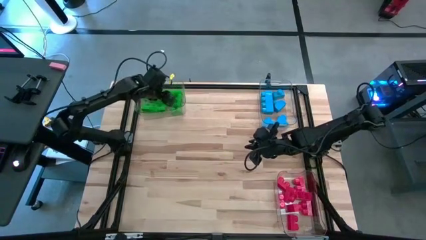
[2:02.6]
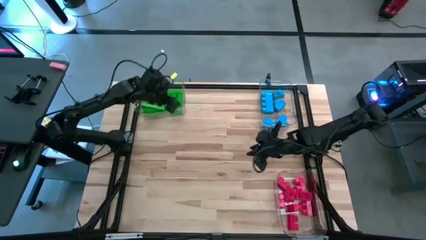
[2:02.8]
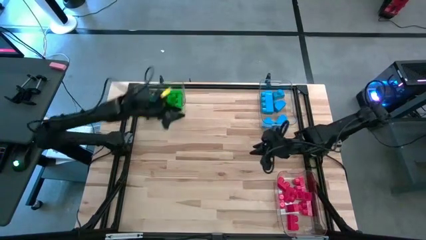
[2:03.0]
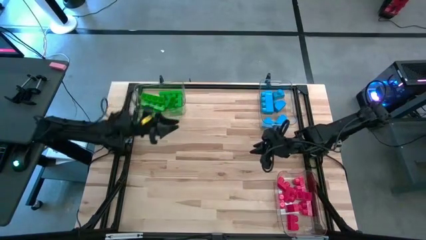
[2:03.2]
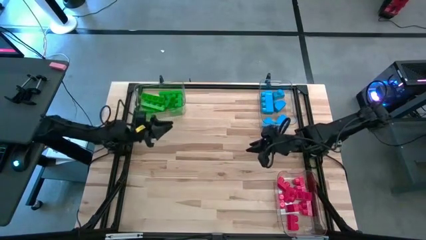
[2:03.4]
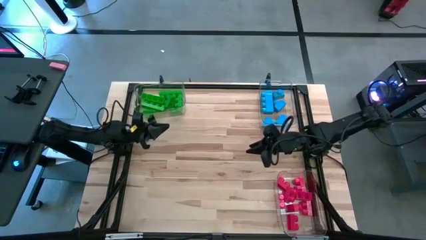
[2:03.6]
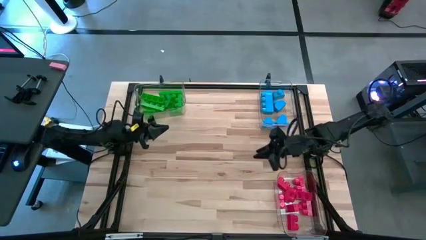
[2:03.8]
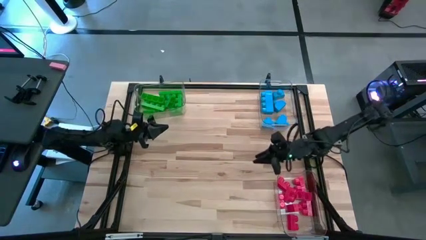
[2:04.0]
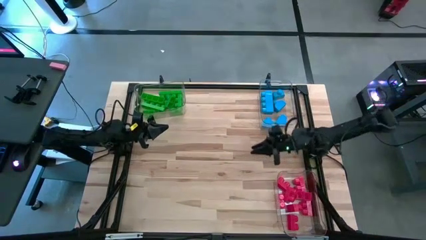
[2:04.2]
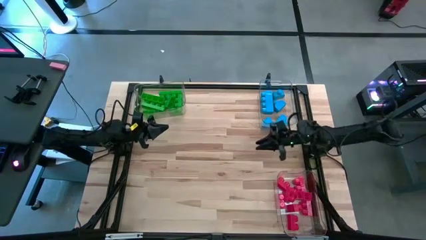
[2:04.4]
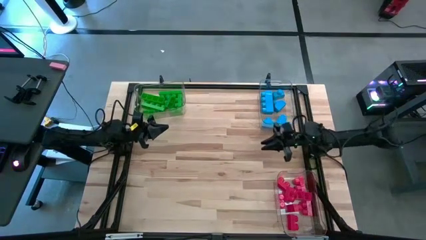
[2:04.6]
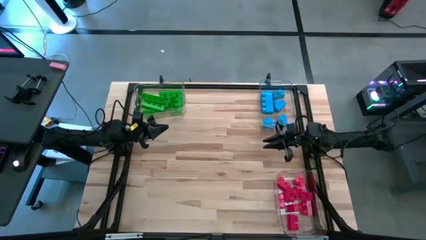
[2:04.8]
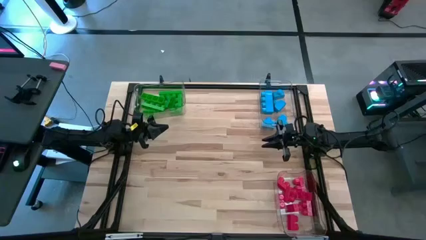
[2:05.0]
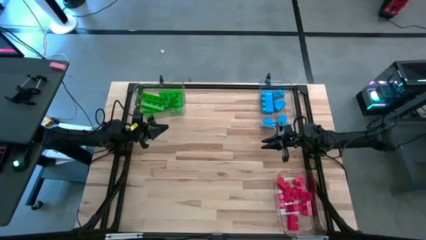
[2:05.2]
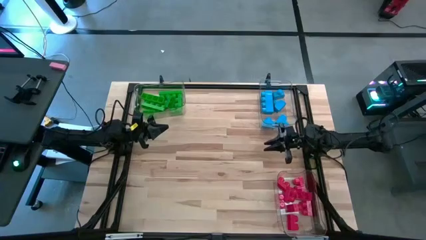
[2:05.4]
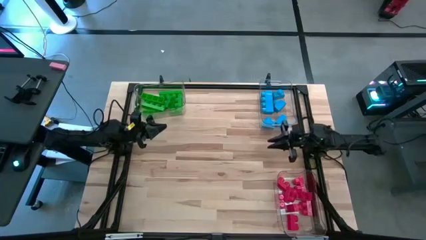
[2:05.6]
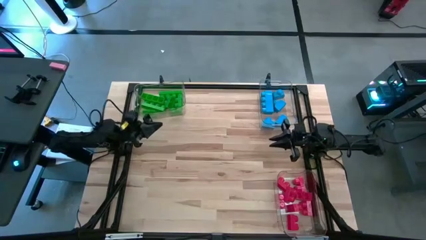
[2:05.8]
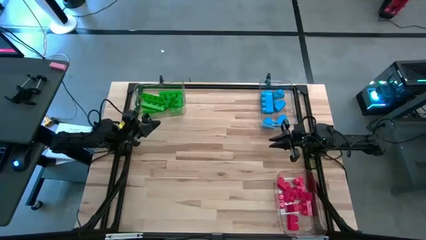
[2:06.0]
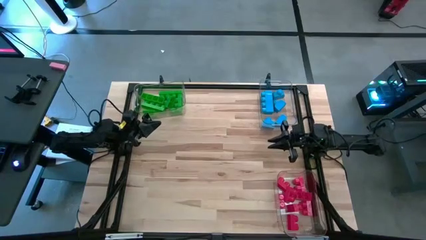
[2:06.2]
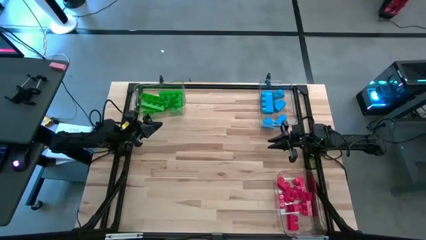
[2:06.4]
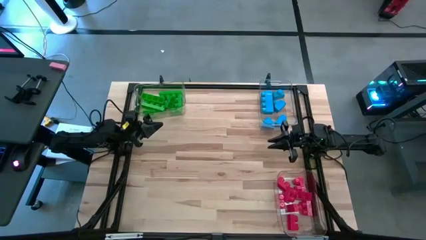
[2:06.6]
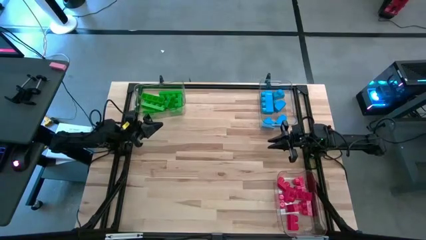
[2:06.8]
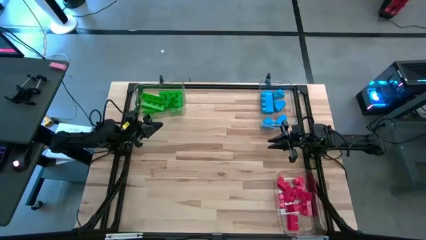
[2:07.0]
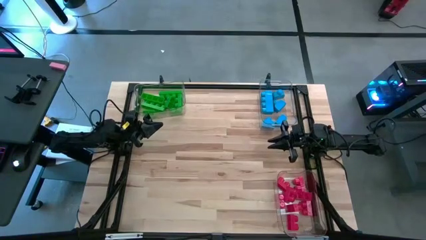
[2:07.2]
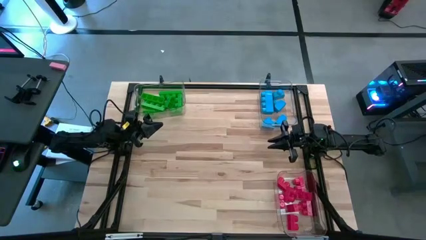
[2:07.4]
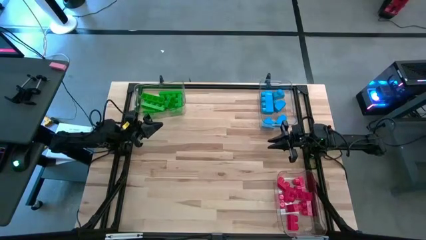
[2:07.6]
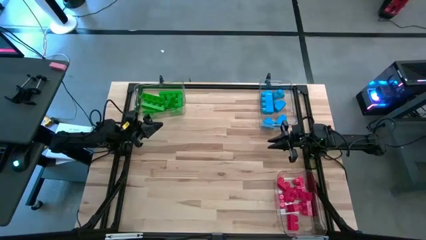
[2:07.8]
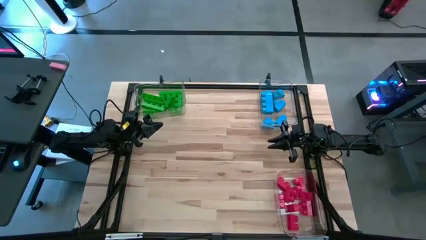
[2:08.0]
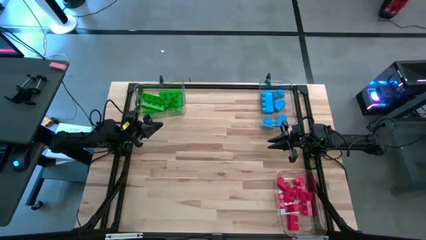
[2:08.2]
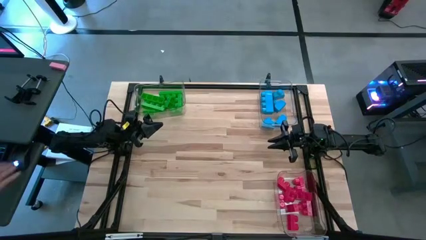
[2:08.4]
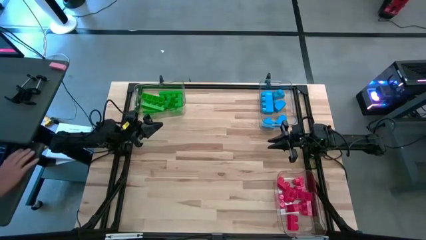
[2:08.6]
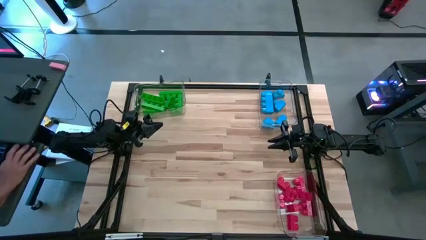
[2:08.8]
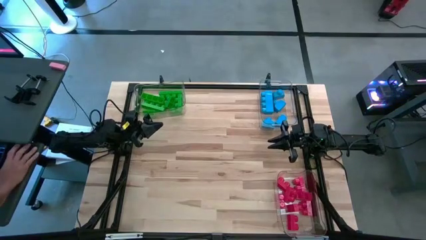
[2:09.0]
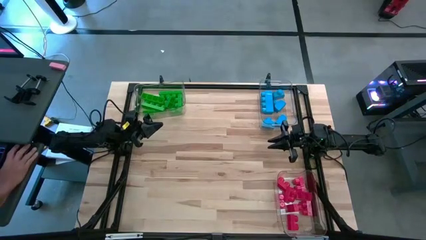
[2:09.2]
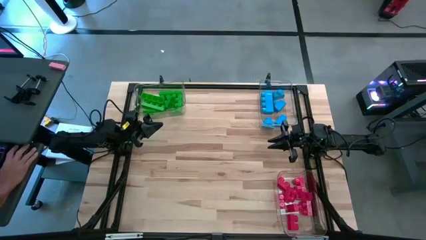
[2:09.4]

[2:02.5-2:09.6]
Task: Sort blocks
Return to Home Position

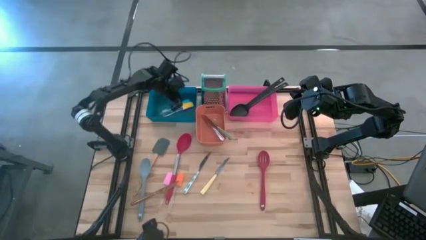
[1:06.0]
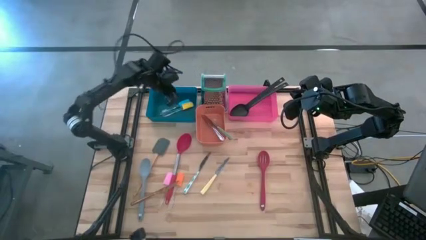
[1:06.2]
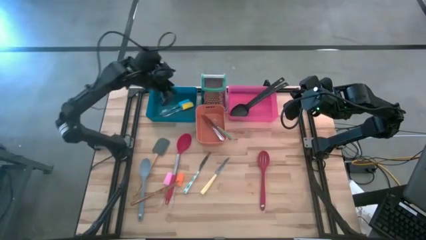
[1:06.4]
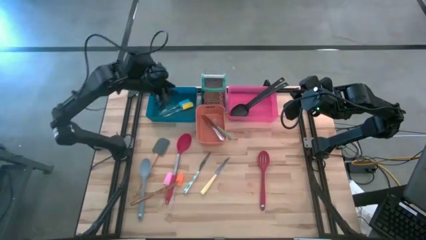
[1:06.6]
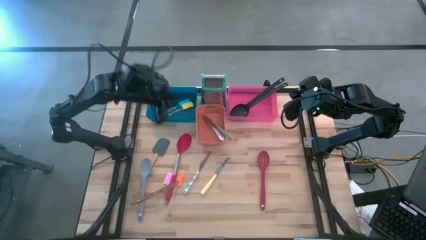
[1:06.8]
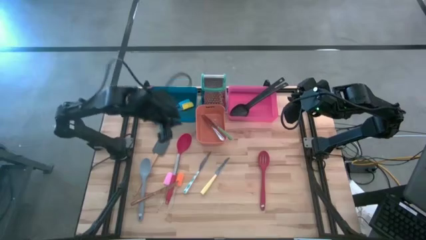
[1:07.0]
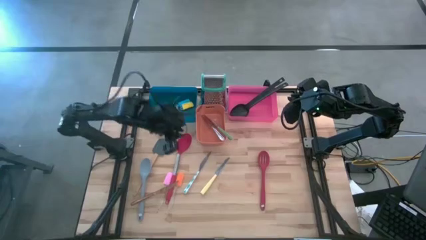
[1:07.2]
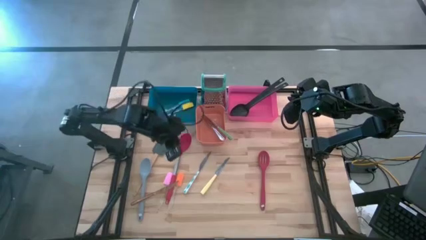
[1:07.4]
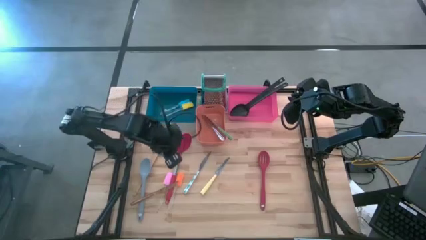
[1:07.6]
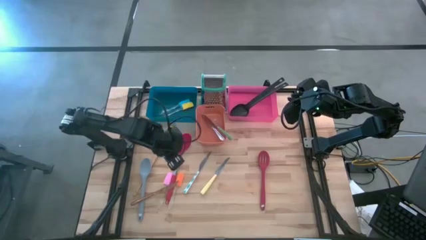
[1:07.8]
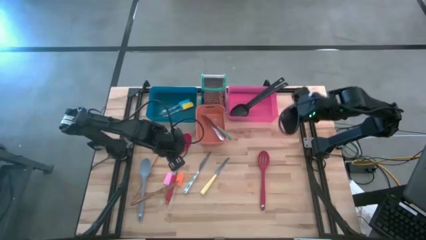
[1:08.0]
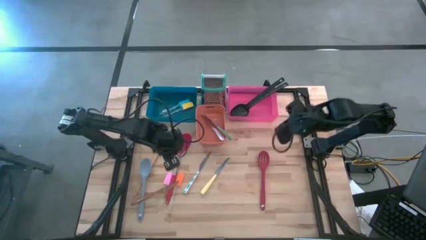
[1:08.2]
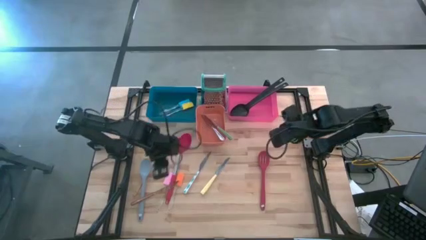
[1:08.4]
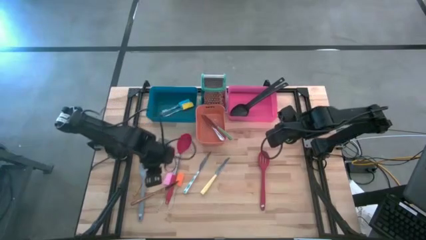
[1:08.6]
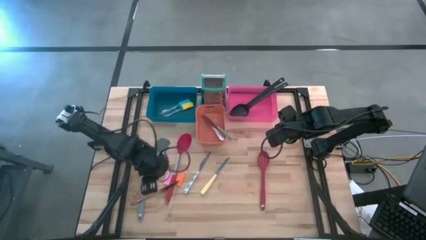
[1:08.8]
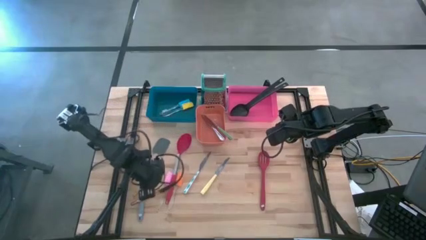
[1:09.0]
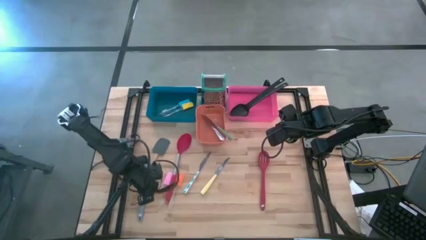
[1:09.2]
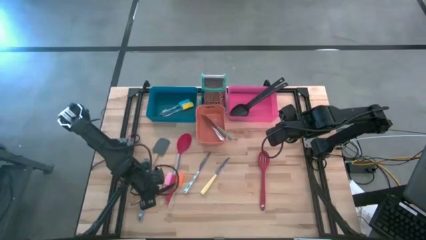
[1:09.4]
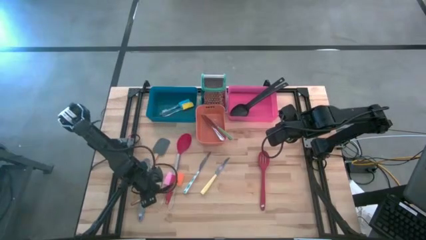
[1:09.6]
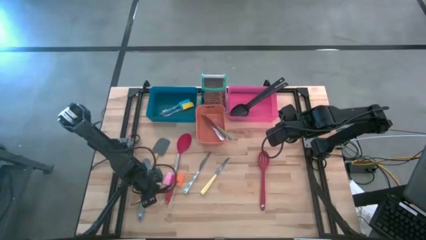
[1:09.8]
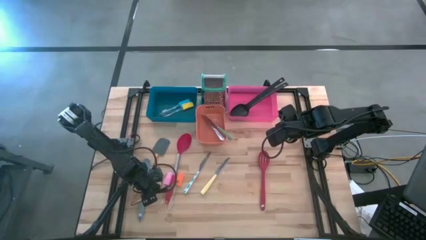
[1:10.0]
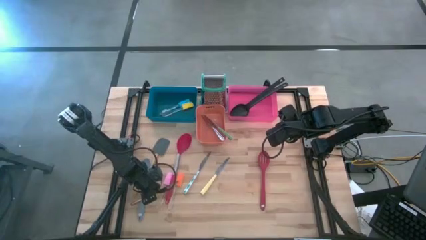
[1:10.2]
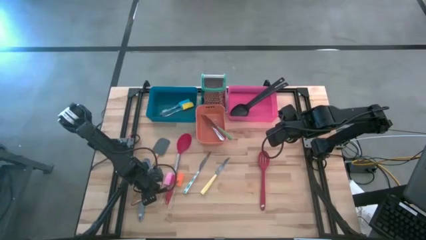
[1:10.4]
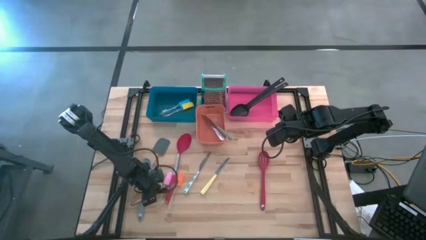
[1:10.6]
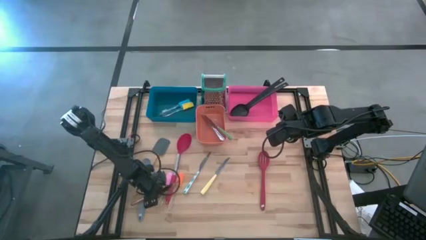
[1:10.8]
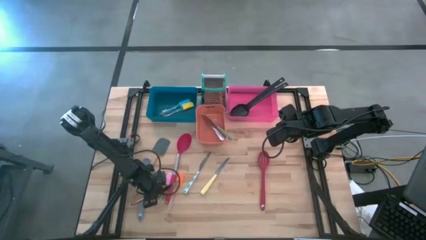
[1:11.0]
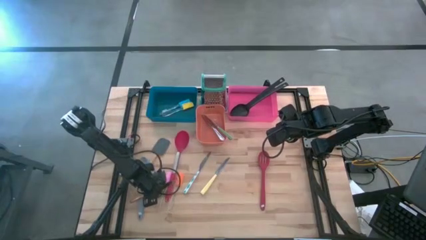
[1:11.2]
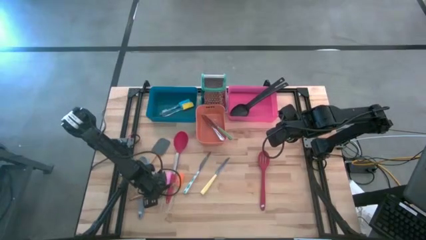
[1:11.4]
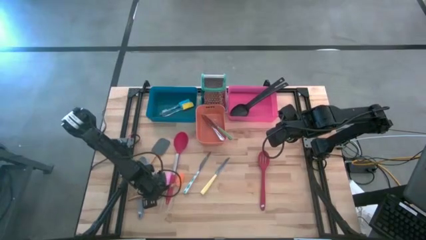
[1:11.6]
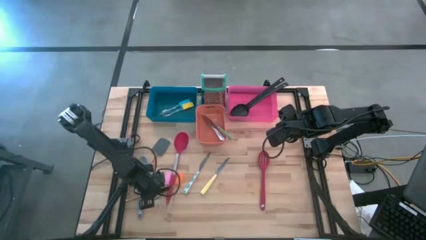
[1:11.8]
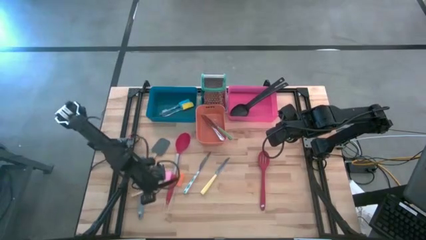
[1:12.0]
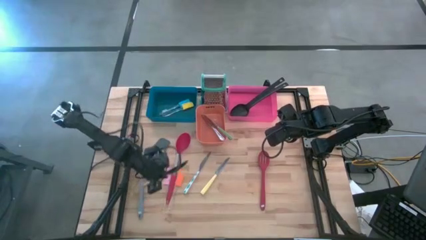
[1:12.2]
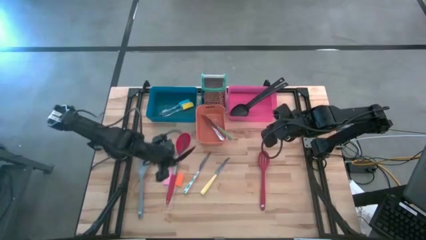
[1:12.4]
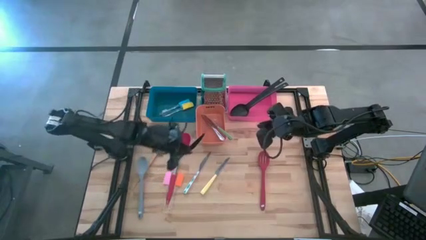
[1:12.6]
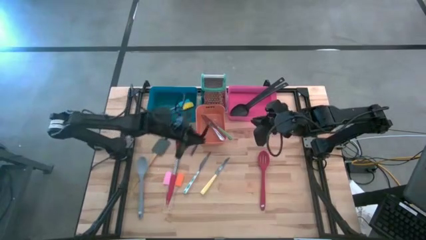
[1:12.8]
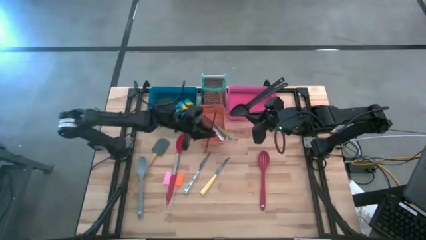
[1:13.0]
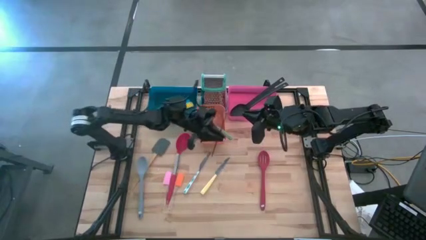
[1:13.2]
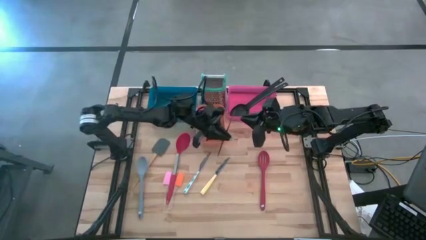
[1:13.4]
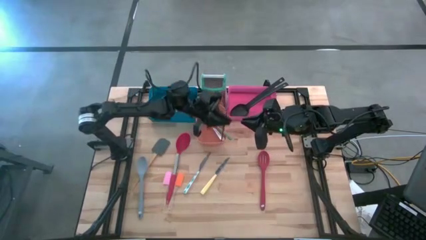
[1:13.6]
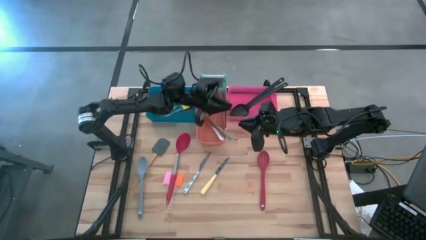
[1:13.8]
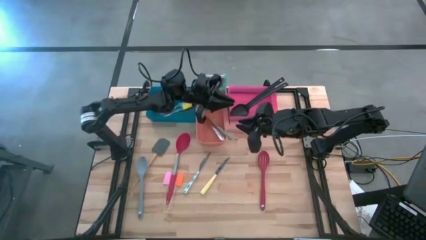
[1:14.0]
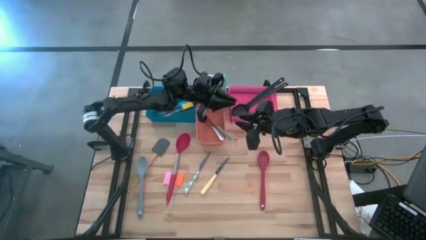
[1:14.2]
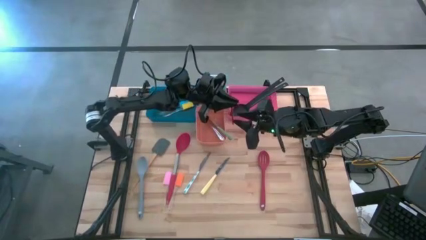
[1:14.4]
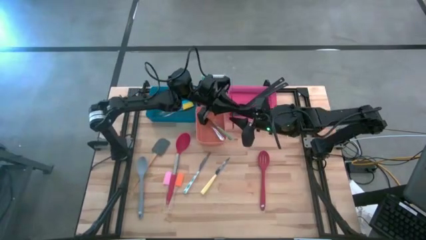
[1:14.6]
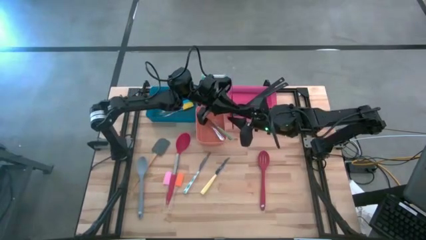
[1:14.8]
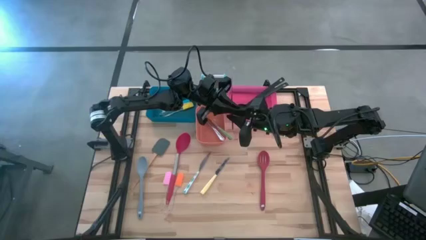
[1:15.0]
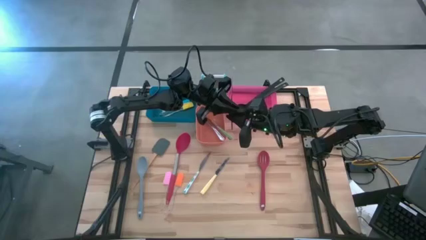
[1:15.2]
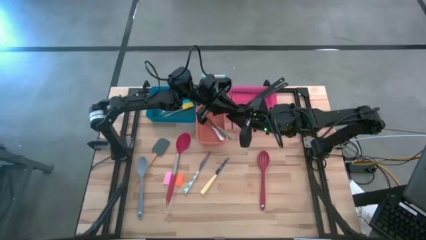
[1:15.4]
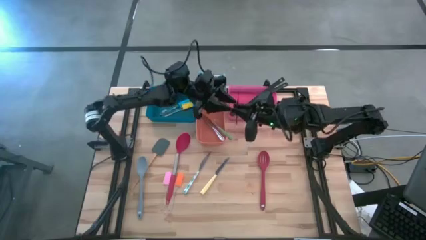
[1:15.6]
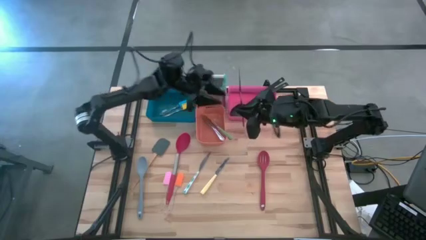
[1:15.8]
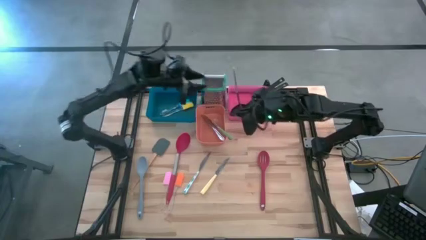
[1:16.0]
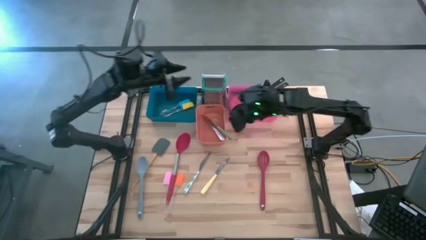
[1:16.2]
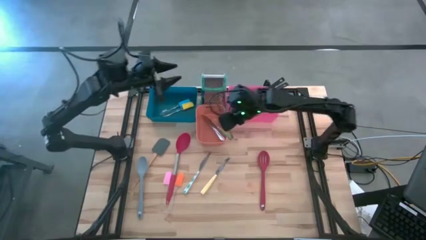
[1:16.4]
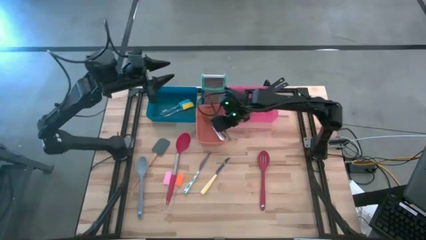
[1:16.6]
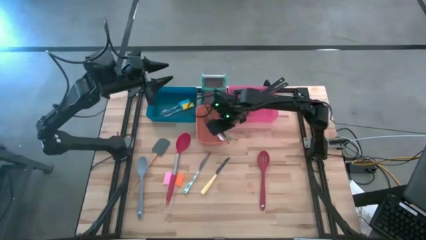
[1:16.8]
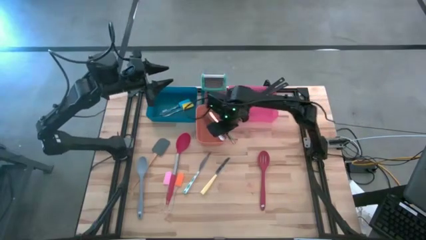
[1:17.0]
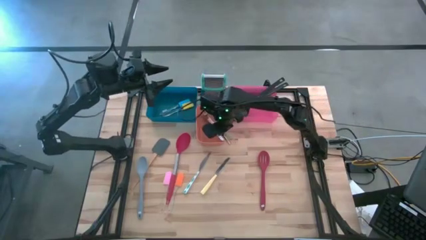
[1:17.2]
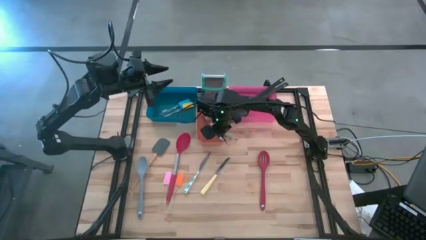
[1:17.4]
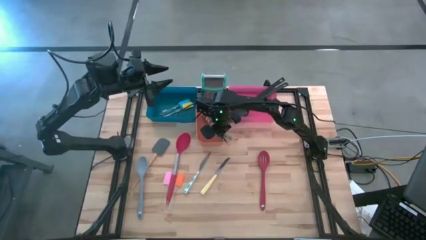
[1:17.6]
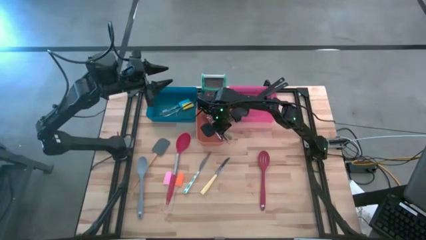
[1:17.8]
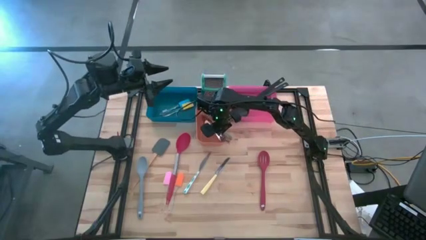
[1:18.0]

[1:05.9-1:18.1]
Task: Pick & Place Kitchen Items
Put the gold table knife into the orange bin
